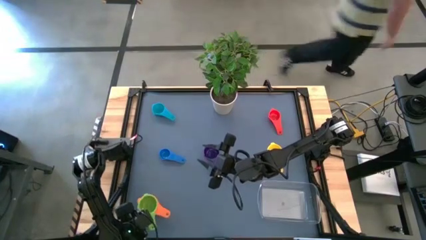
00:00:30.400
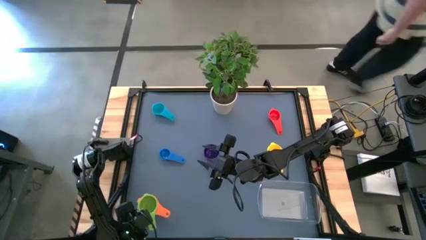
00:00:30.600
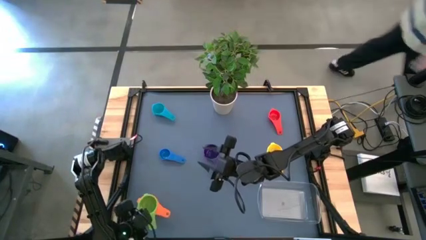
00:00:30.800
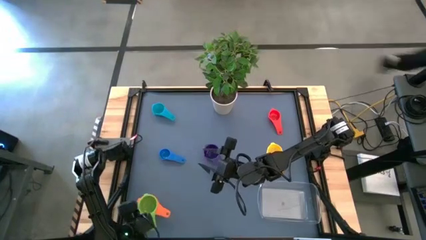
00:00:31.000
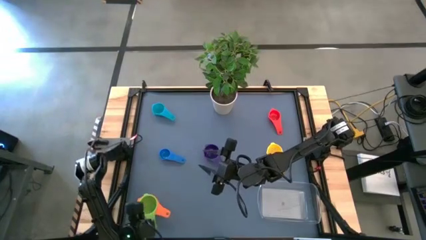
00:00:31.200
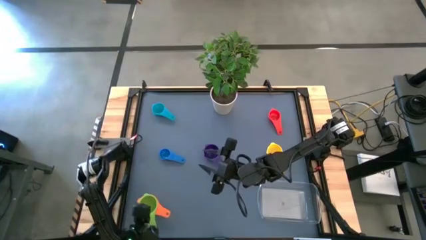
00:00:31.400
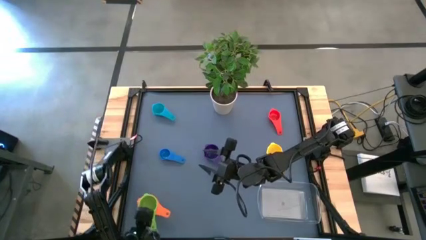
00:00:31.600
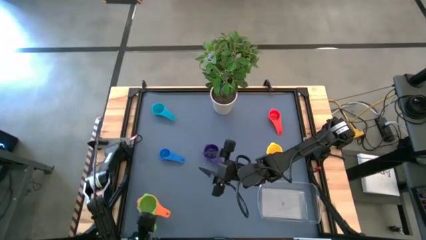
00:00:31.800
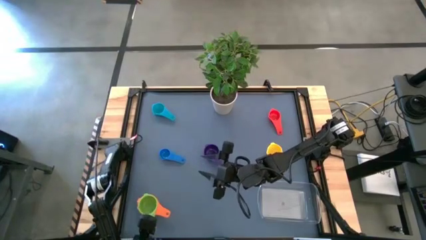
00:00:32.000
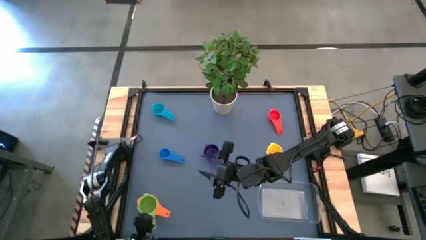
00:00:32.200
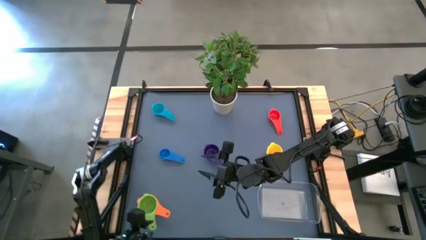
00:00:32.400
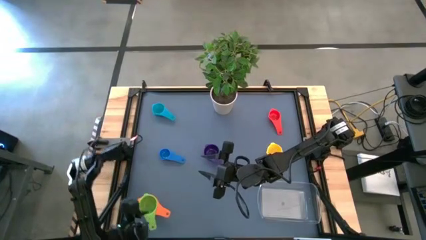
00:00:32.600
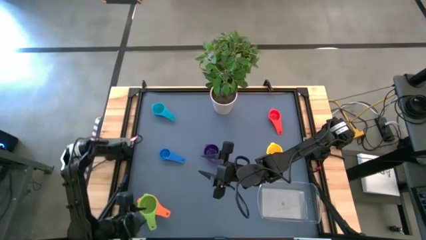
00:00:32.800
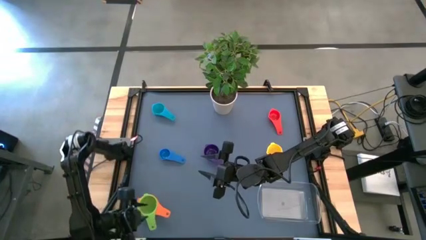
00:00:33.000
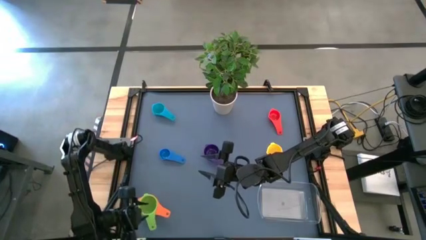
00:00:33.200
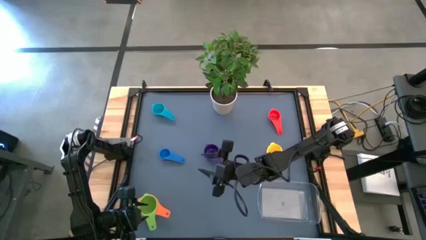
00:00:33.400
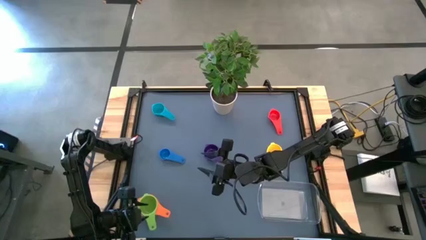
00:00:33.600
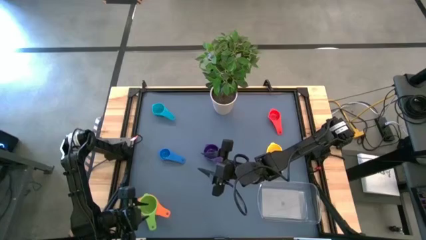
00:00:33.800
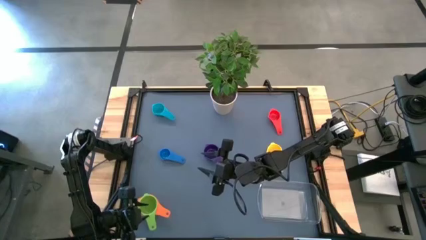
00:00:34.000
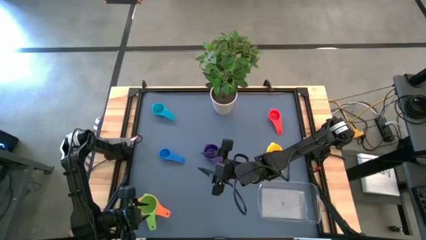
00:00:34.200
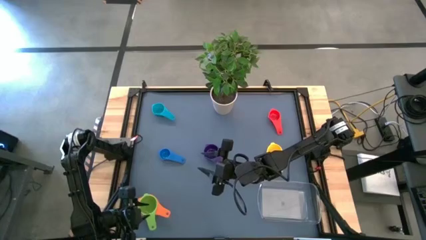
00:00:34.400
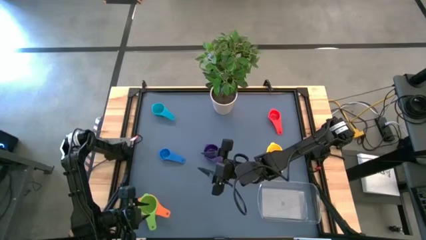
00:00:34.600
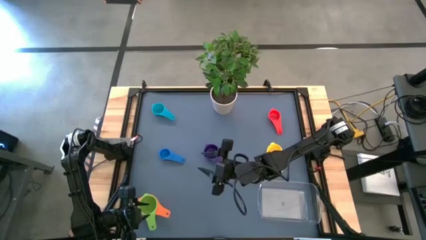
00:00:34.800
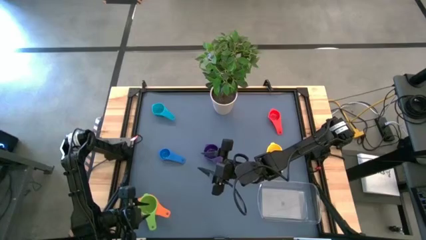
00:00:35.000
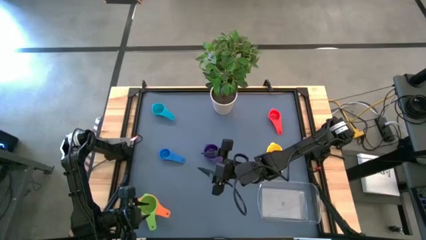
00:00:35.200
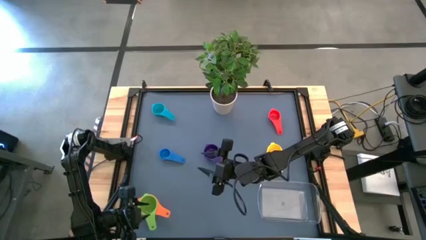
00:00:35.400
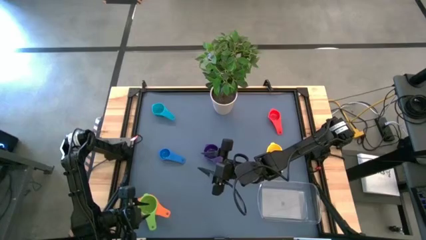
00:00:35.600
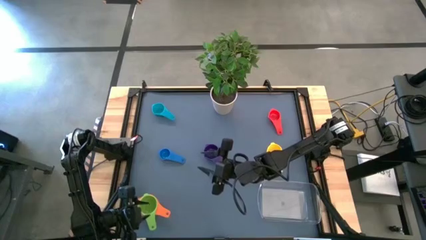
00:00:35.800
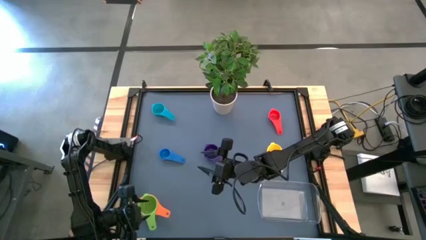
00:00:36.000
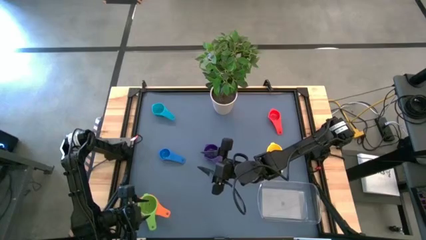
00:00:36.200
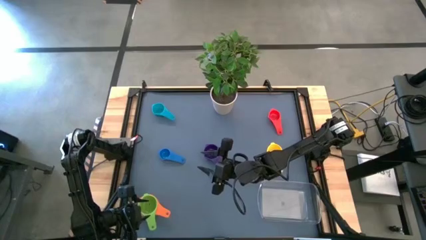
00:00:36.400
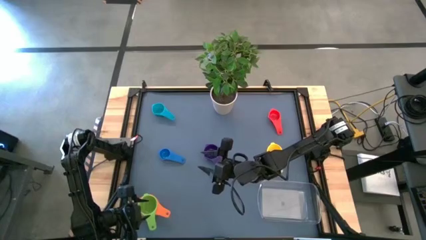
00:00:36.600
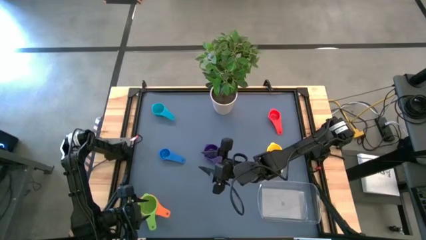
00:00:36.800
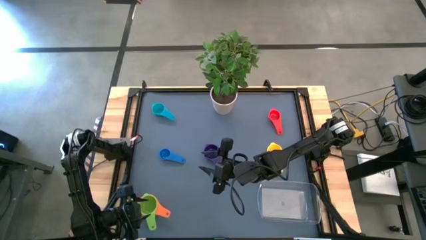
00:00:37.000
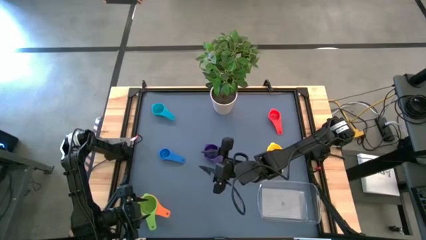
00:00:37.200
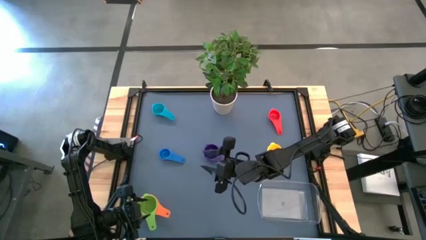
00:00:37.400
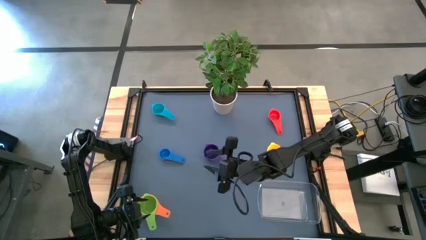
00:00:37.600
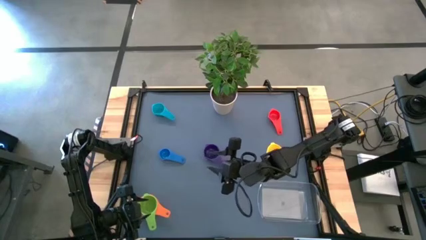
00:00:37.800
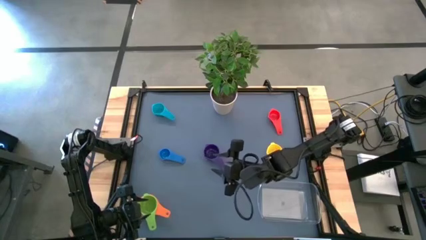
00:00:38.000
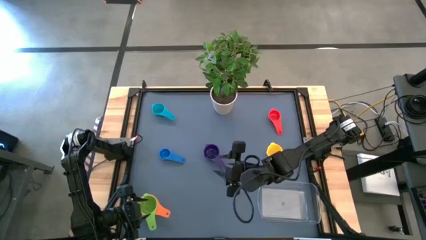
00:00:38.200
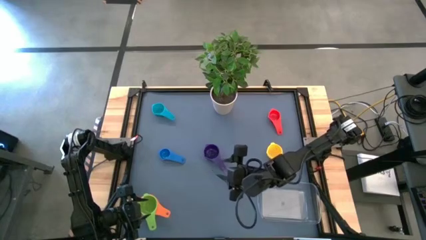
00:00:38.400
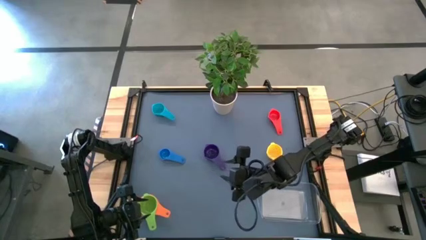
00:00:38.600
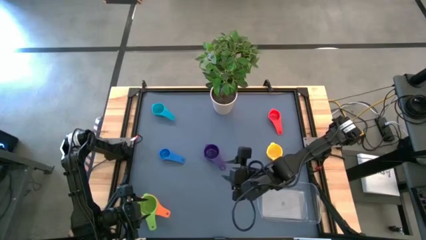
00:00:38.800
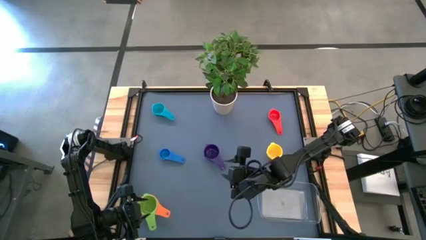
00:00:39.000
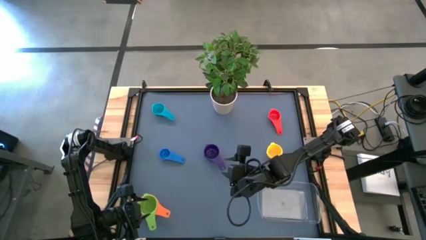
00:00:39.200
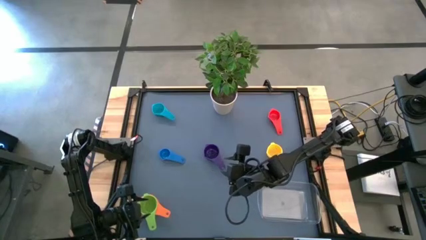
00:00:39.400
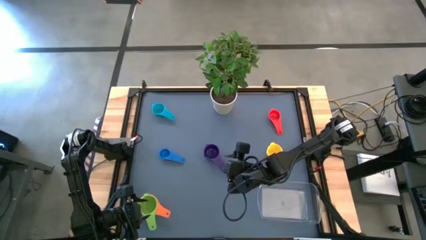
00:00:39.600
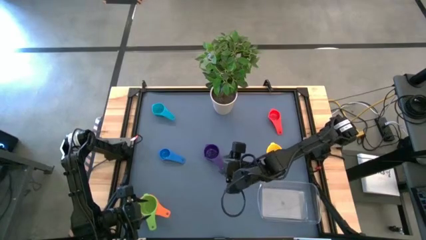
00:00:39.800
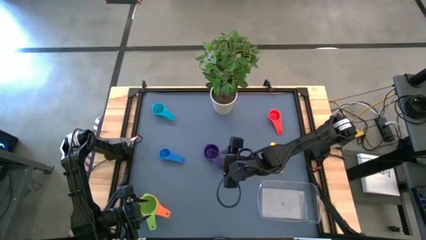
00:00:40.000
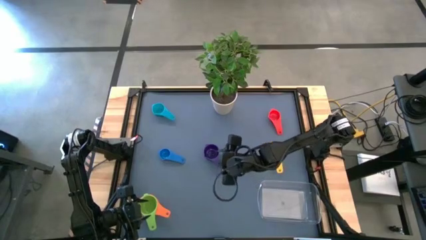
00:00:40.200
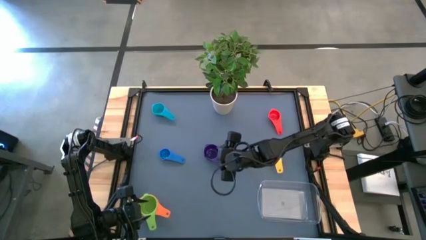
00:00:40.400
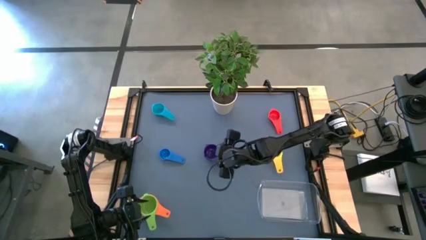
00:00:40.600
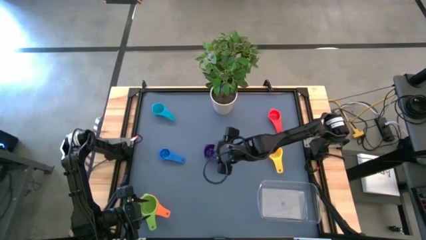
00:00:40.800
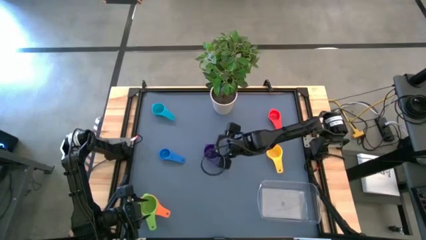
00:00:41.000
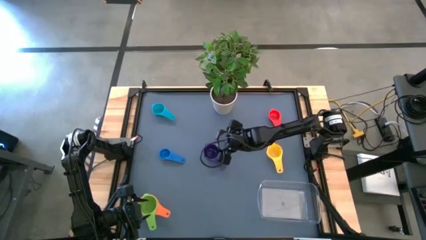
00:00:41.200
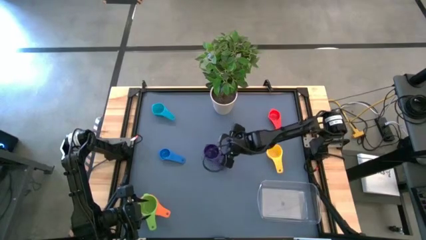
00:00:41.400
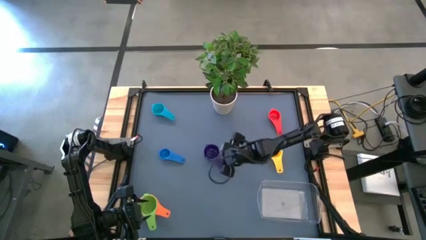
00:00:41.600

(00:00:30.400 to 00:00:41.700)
Task: Nest measuring cups in basket
Adjust the nested measuring cups
